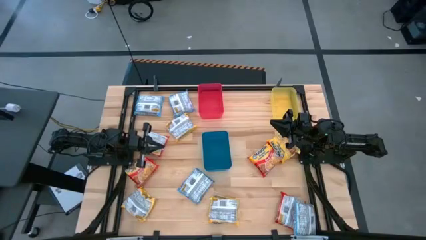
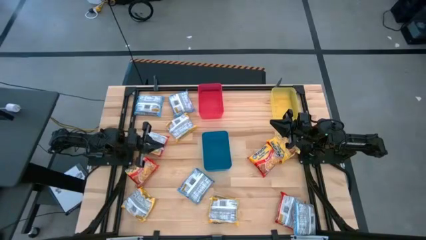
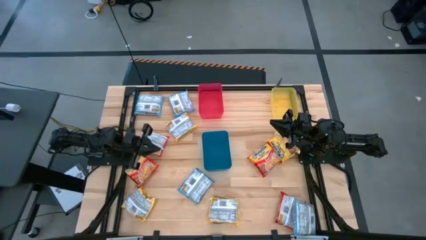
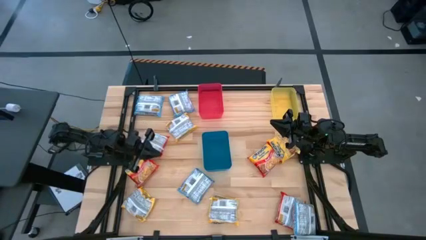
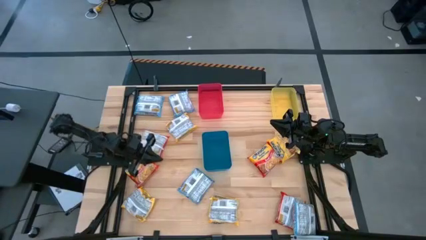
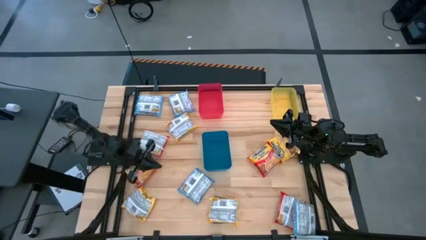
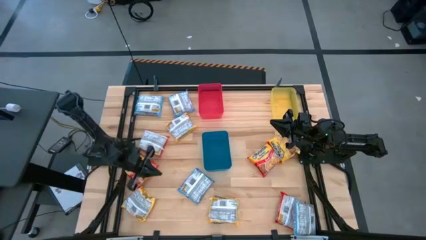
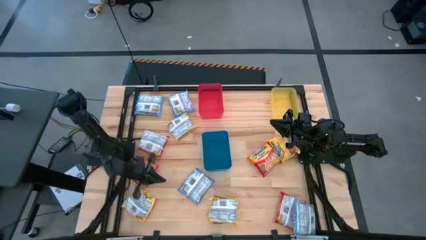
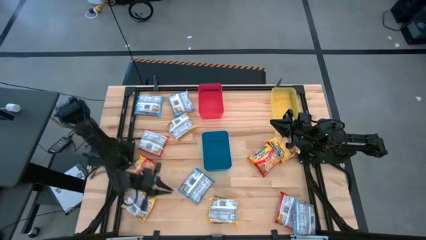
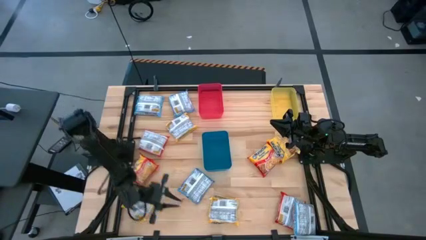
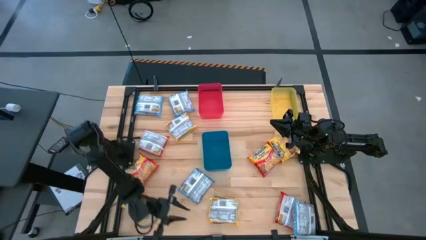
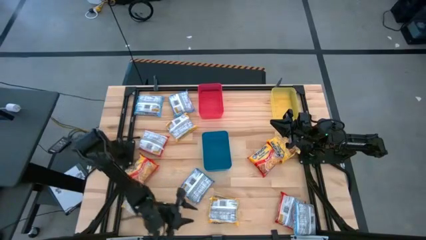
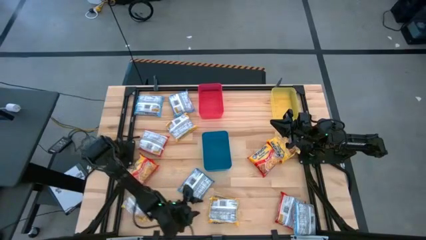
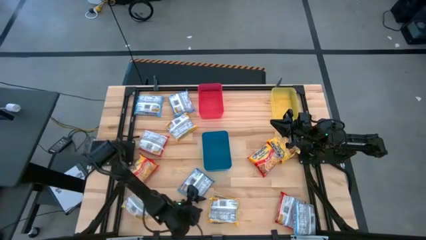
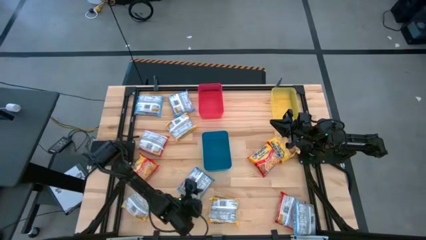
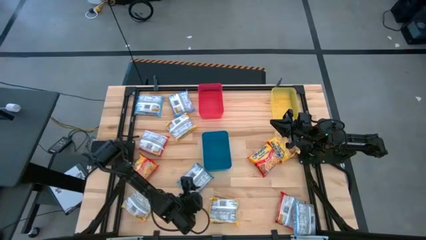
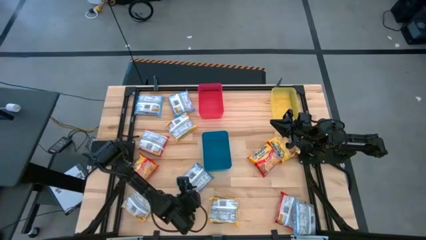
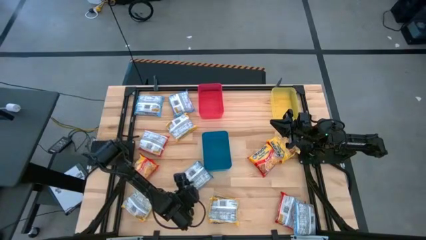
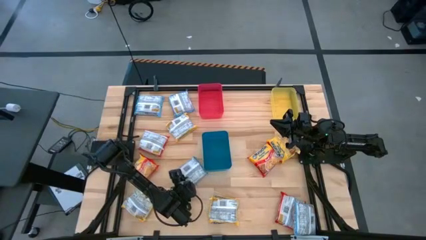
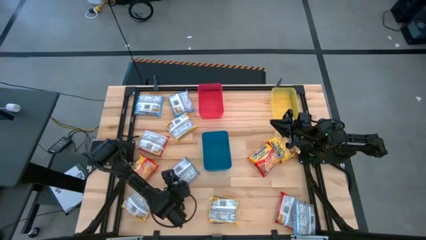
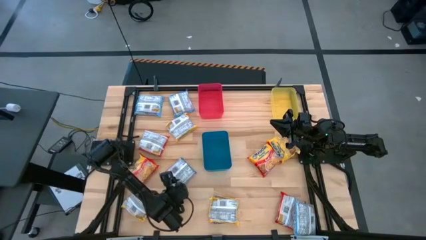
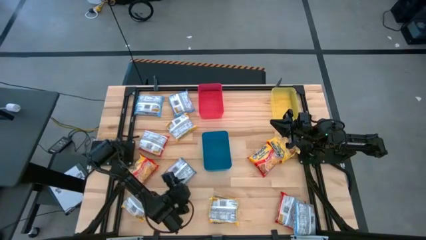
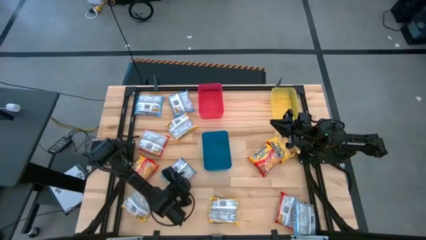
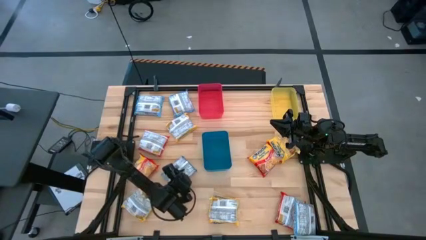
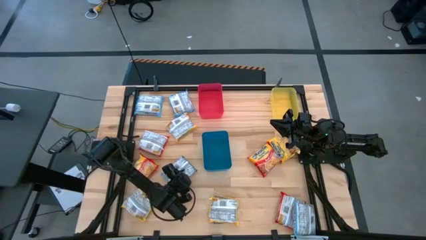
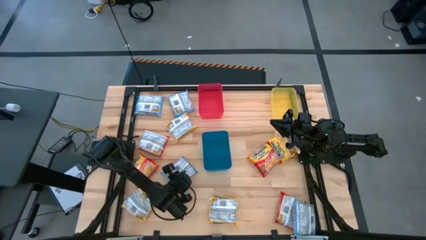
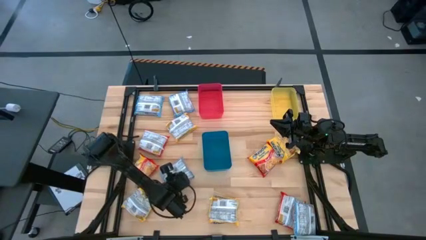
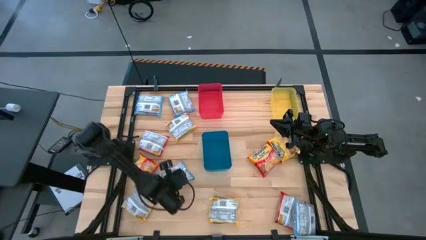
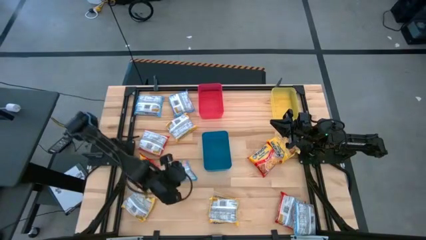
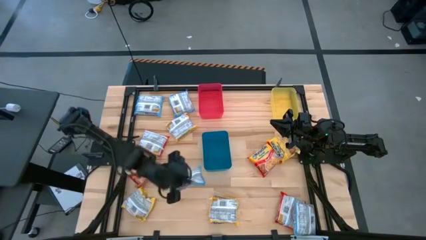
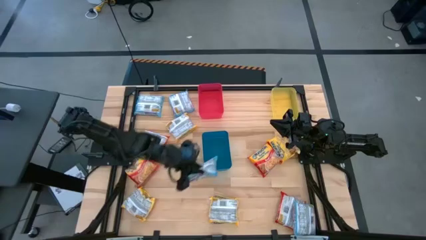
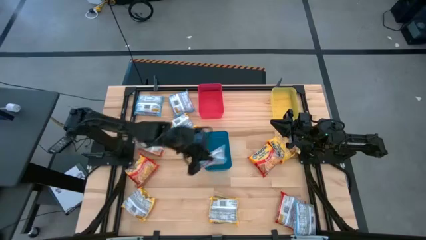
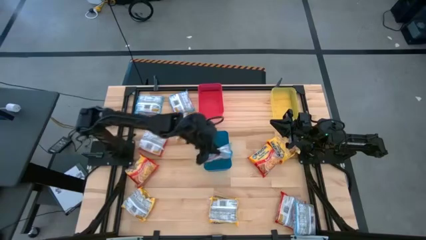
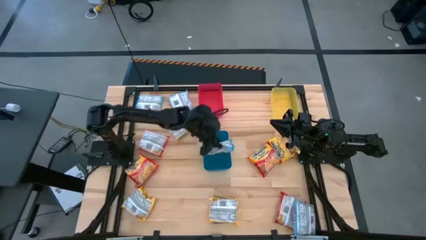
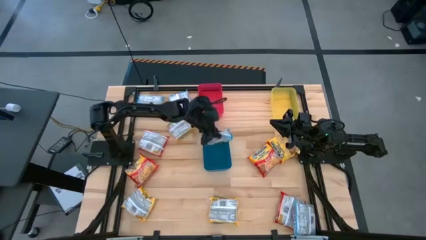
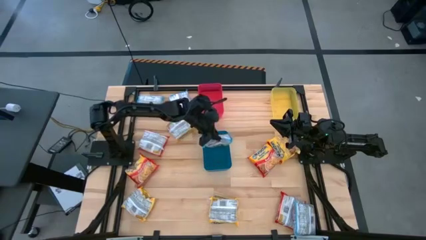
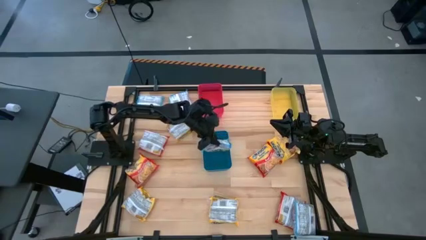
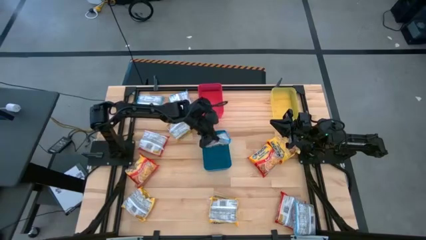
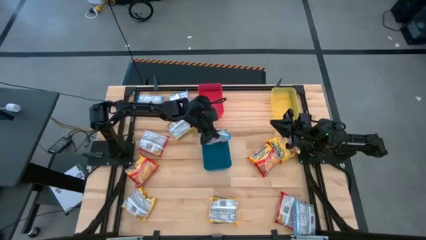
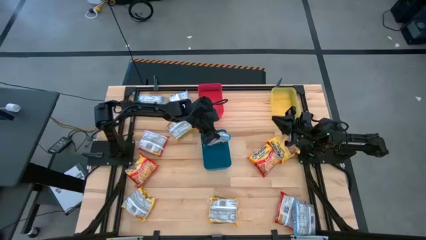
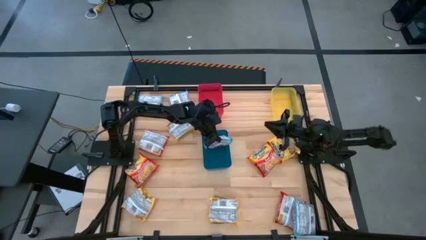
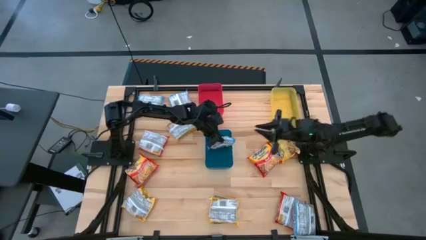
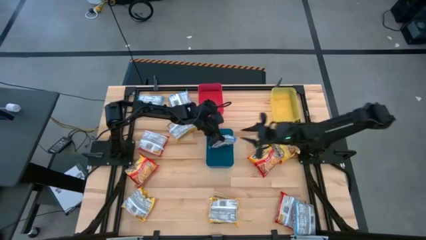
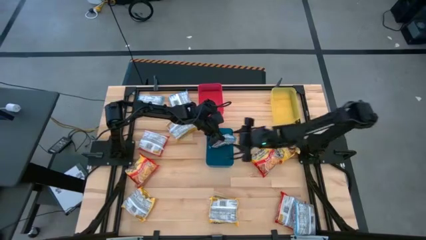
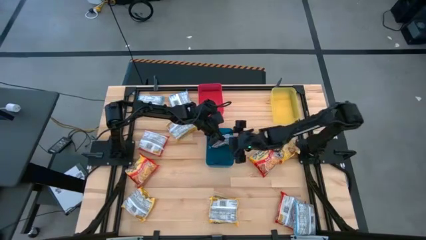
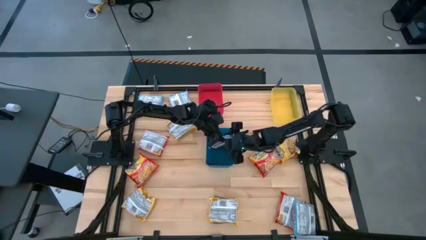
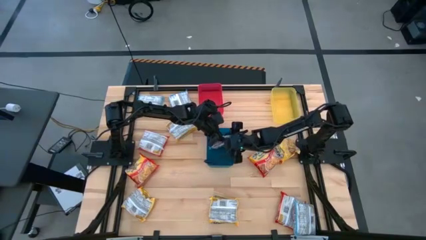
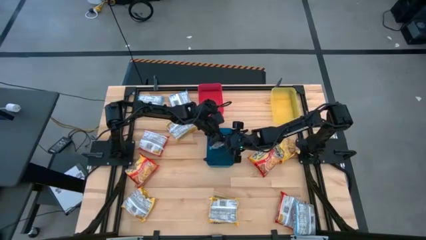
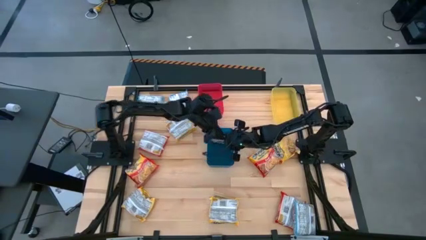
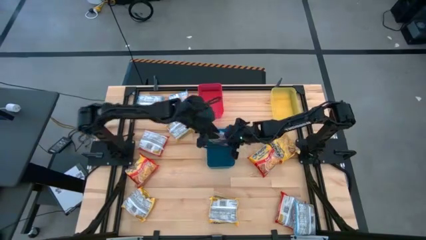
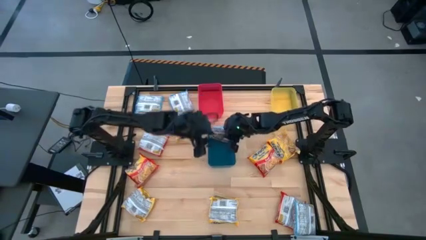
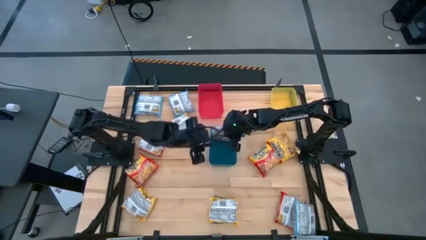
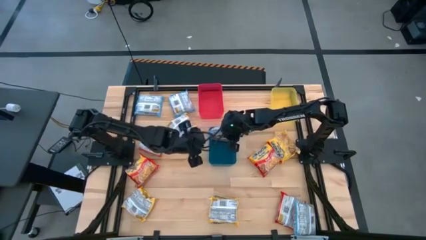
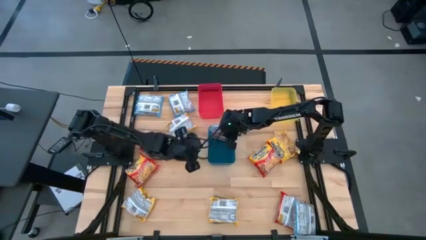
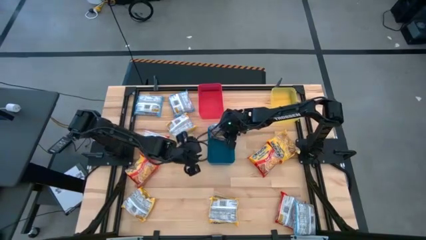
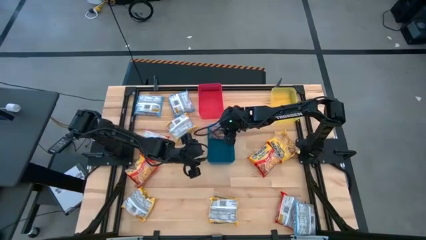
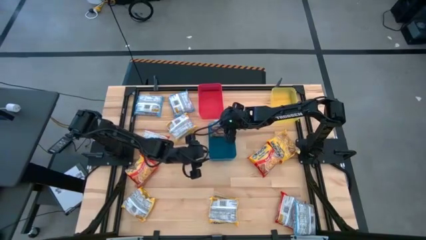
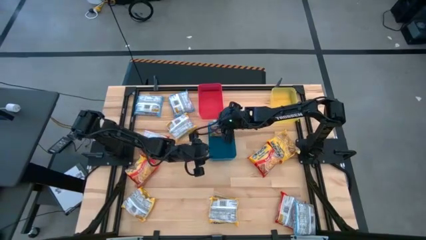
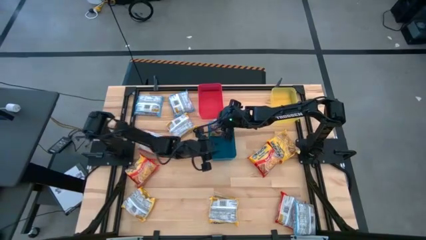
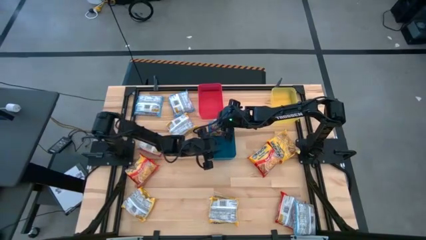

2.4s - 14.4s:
Task: Sort Maruchan noodles
Put the blue noodle pack into the blue bin

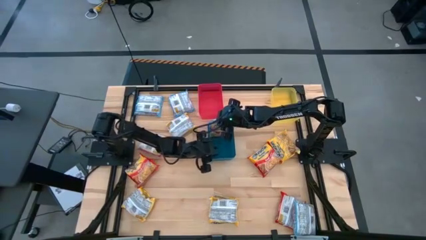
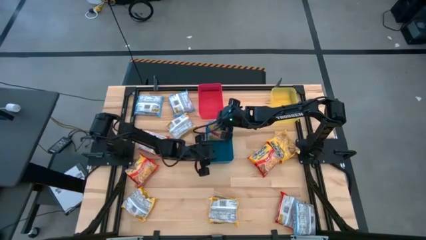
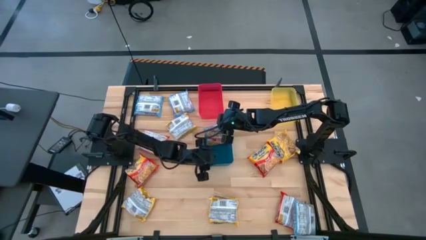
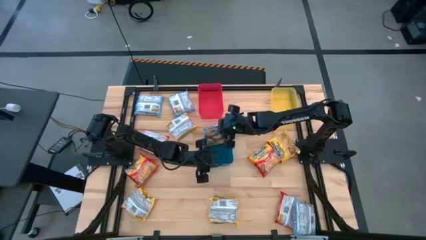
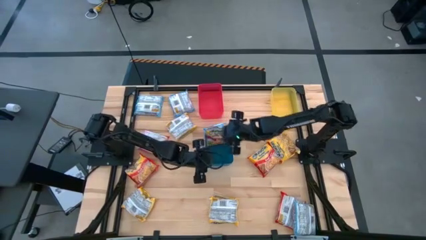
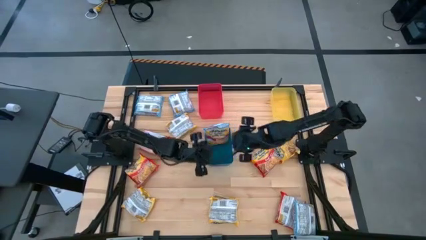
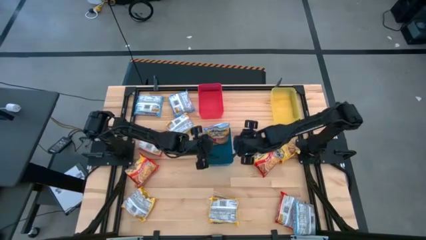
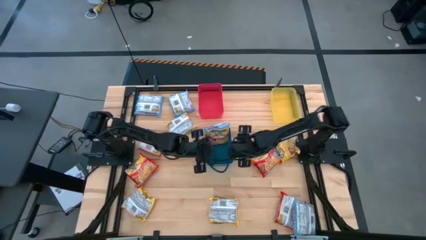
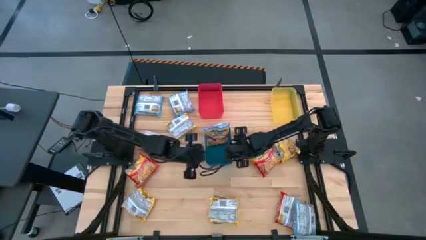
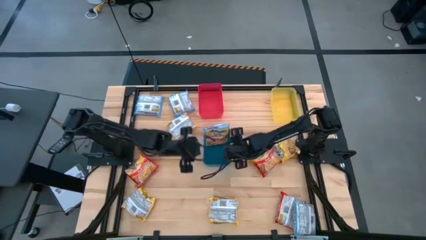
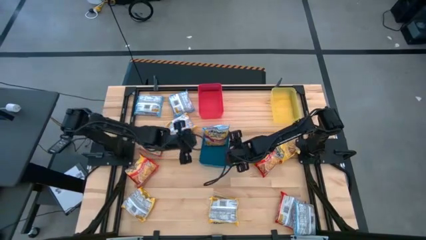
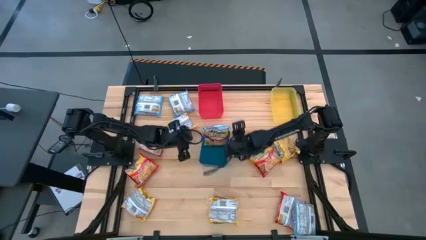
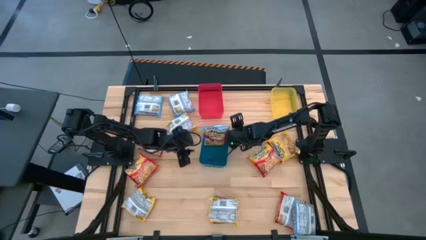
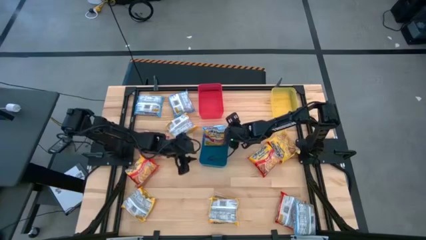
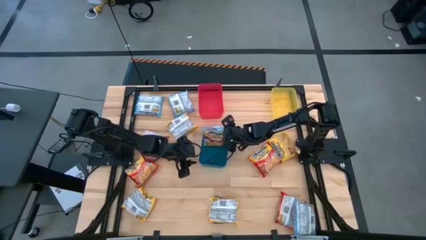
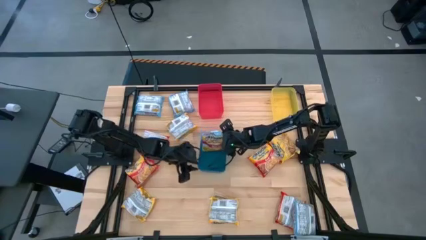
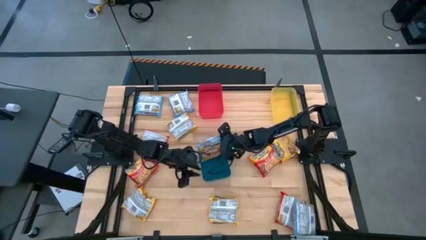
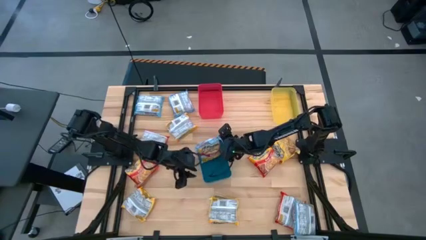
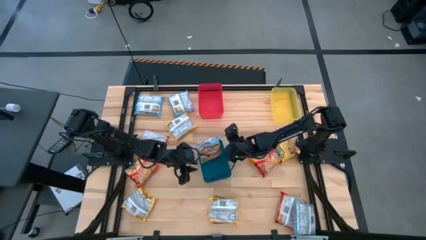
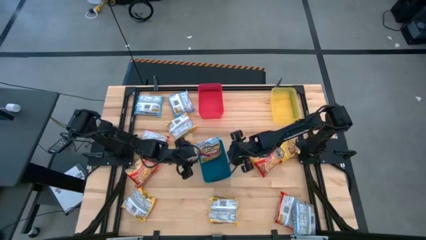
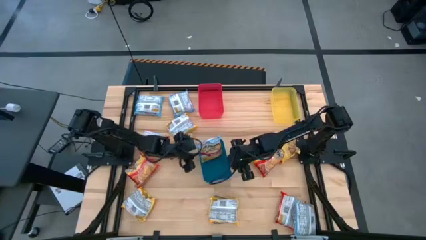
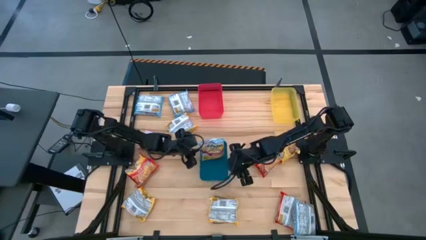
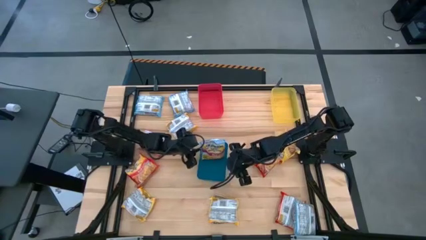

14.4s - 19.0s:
Adjust the blue bin on the table
